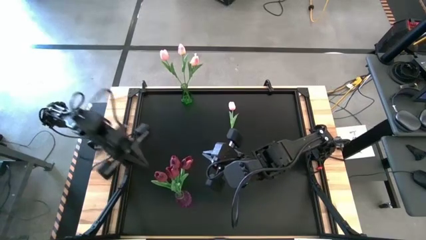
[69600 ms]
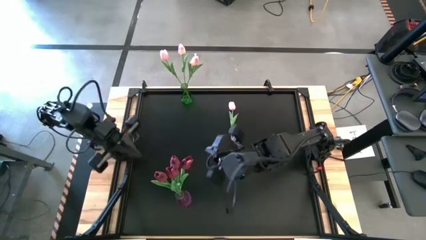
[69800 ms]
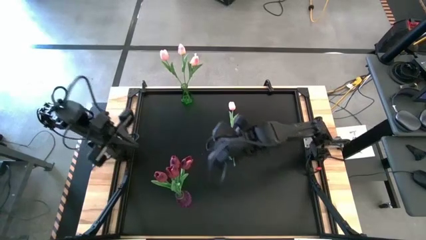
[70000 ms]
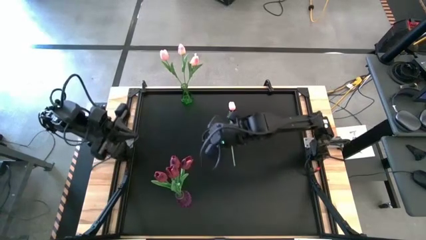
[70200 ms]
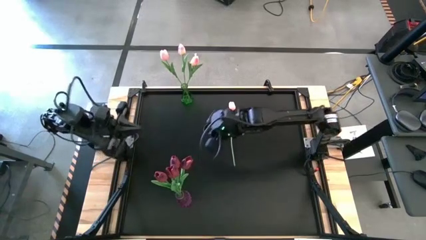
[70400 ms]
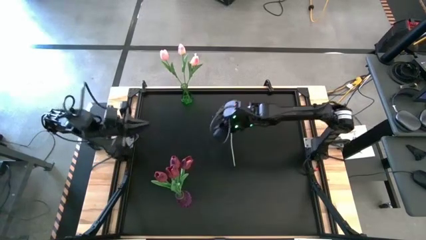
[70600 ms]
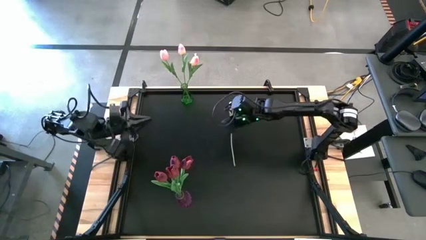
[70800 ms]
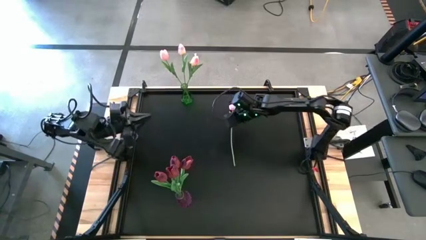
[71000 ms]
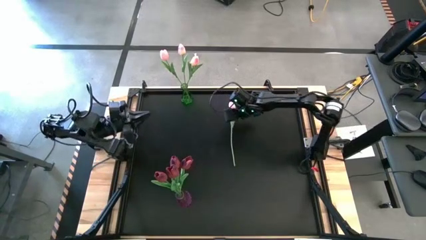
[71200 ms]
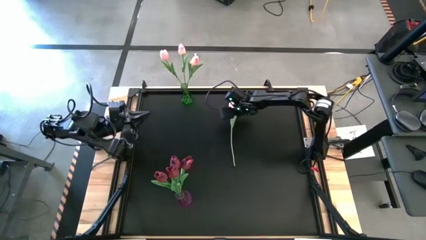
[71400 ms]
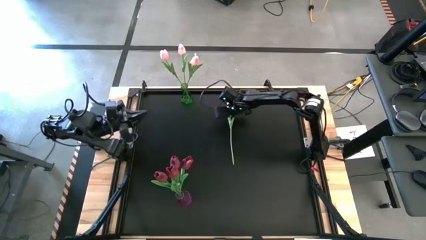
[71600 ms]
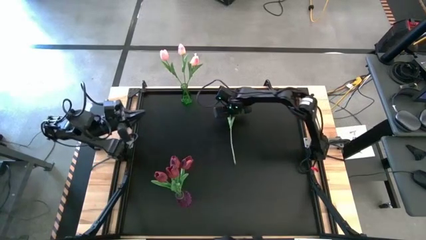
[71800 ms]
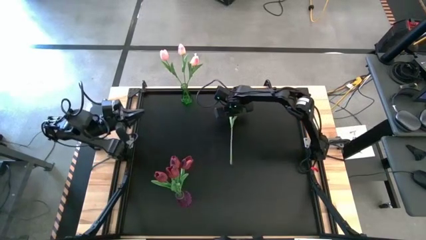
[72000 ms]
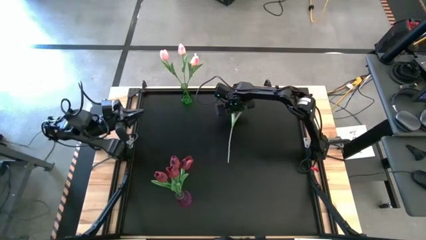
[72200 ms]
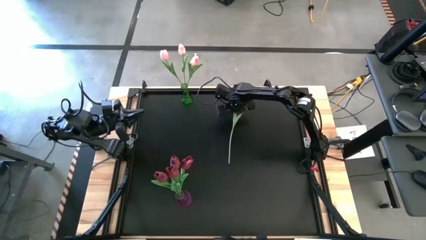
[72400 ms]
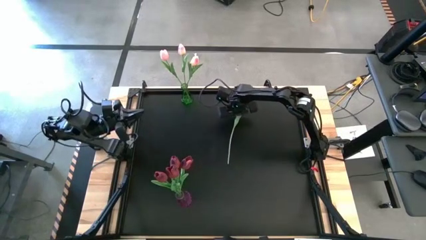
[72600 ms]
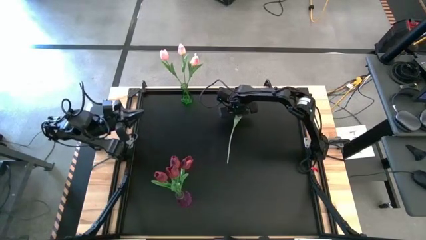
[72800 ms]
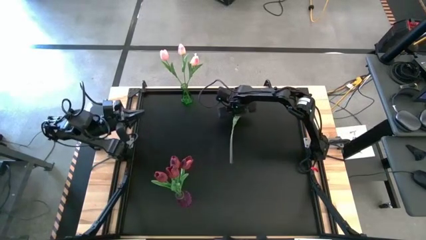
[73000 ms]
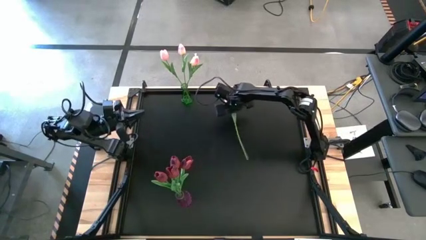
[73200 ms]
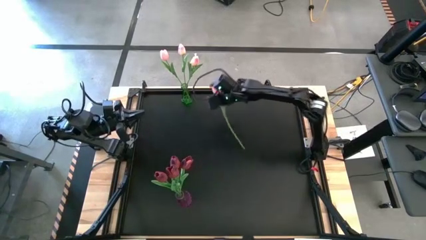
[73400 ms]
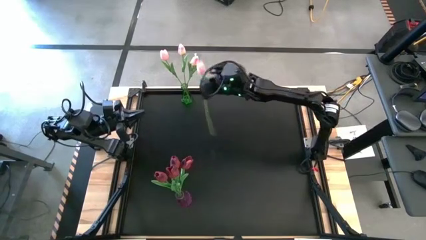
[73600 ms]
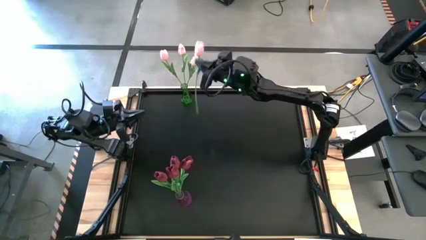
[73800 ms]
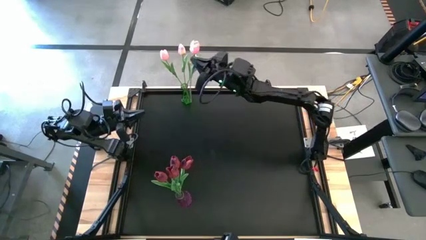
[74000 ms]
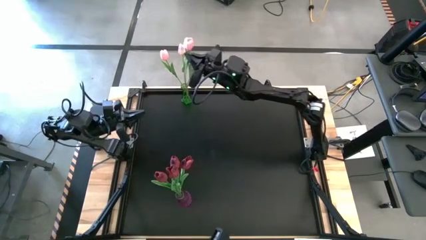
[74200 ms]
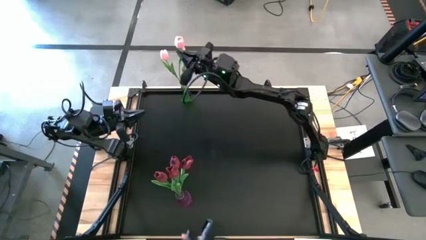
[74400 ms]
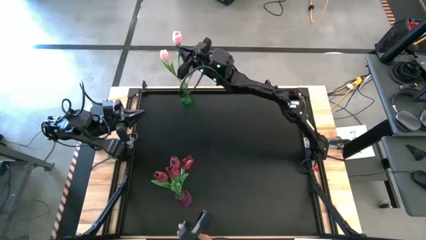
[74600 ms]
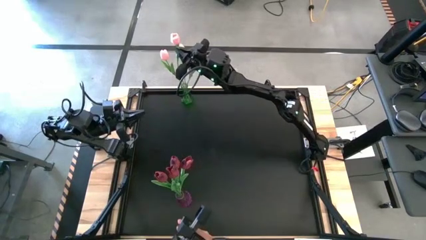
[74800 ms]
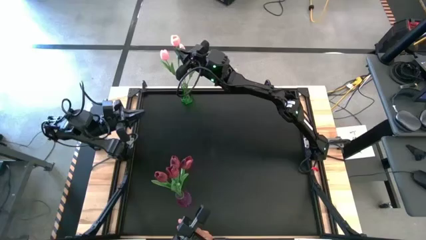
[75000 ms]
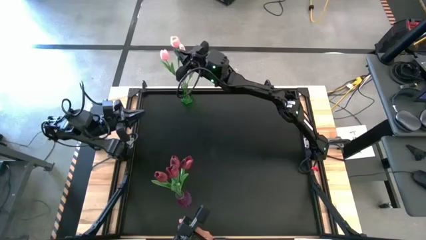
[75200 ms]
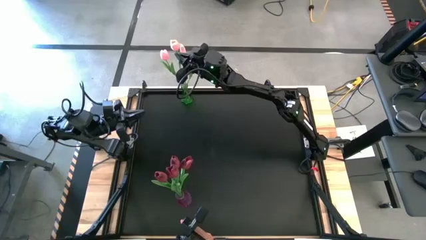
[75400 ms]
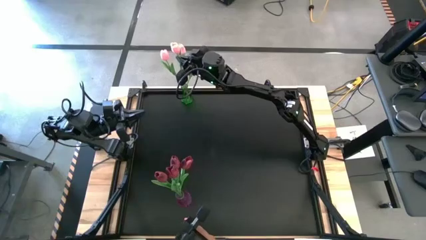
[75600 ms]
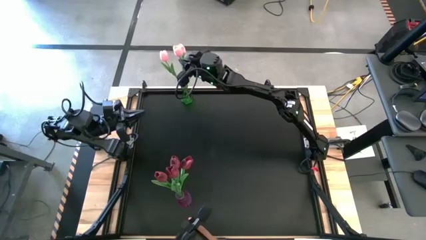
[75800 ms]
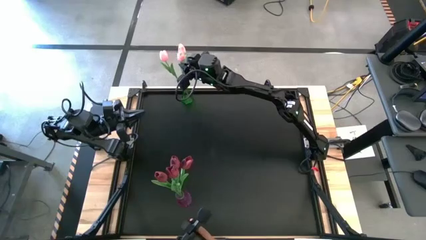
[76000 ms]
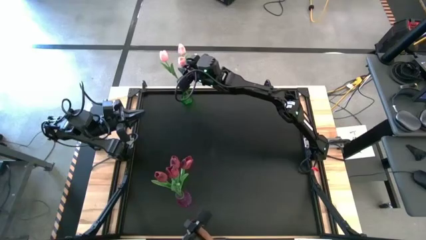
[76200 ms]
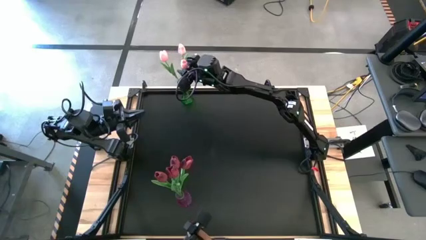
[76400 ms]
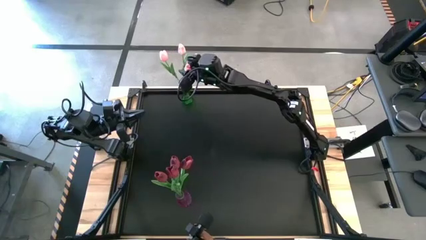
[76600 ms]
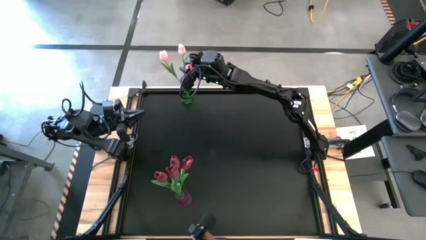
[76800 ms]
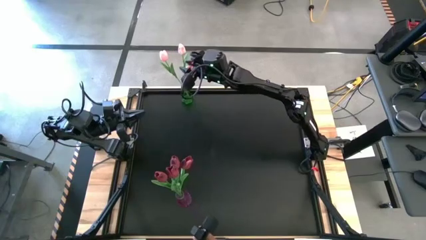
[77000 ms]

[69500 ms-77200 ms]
Task: Sort flowers into vase by color
Put the pink tulip into the green vase

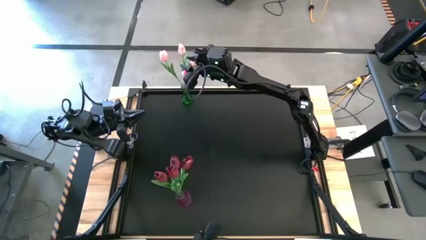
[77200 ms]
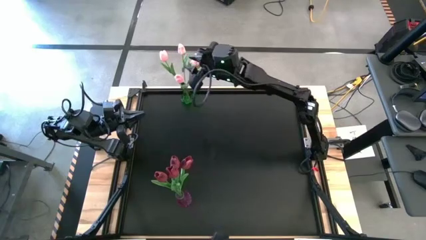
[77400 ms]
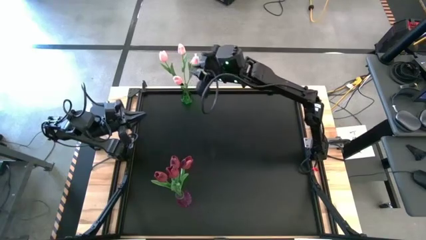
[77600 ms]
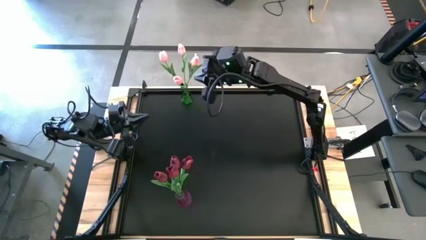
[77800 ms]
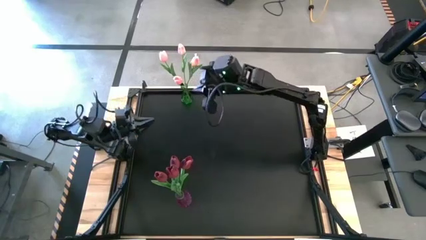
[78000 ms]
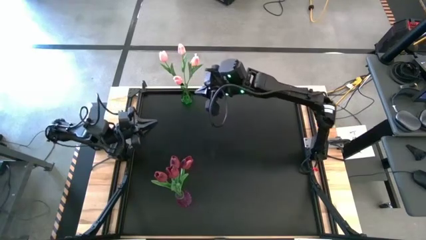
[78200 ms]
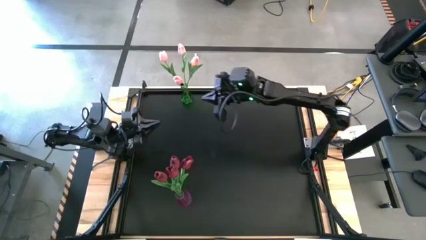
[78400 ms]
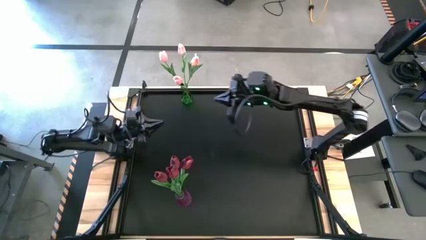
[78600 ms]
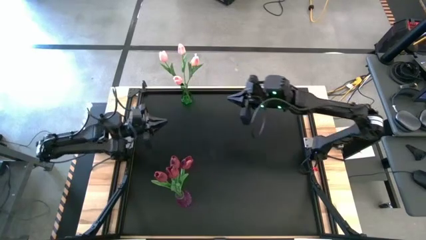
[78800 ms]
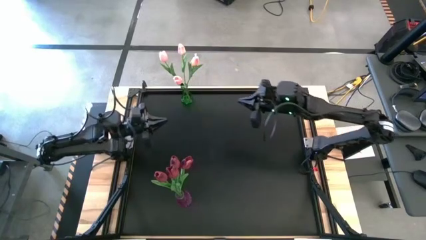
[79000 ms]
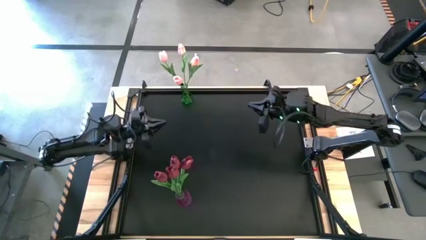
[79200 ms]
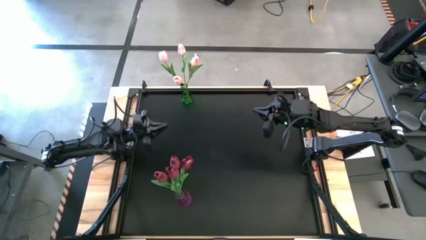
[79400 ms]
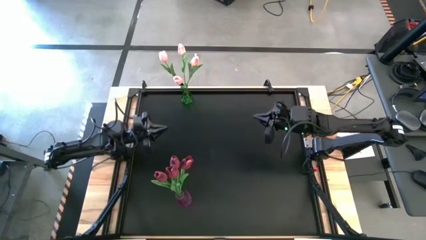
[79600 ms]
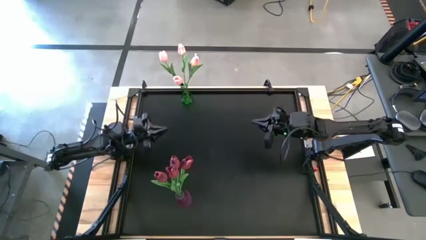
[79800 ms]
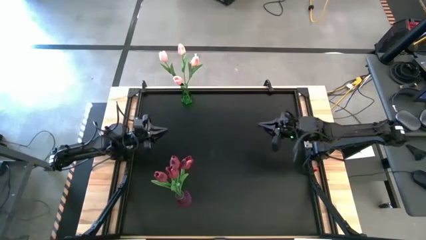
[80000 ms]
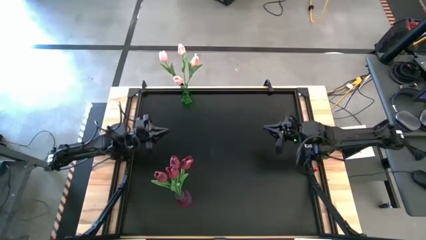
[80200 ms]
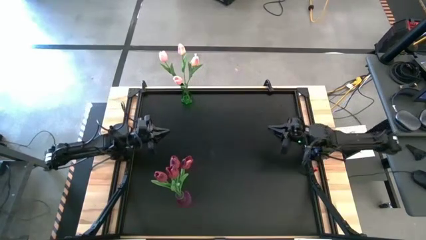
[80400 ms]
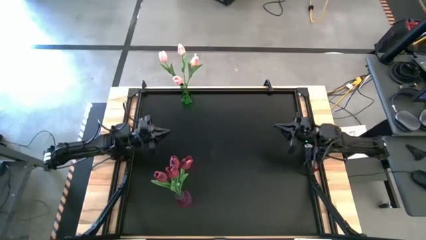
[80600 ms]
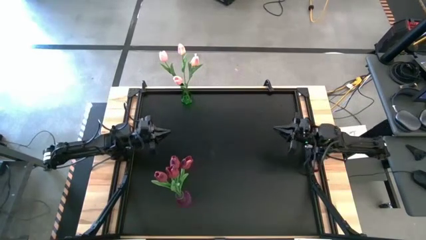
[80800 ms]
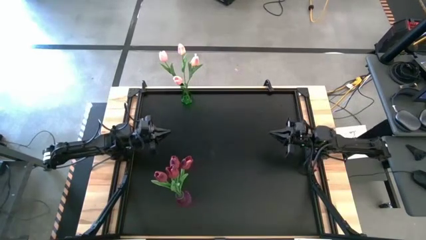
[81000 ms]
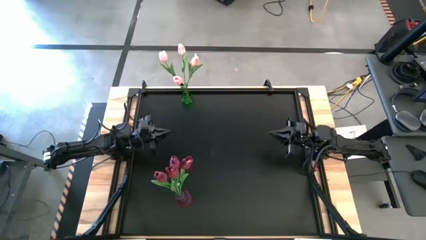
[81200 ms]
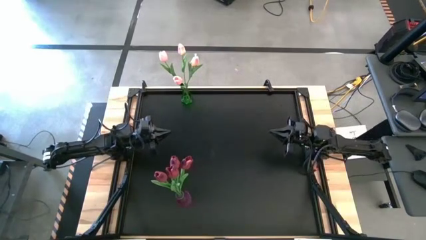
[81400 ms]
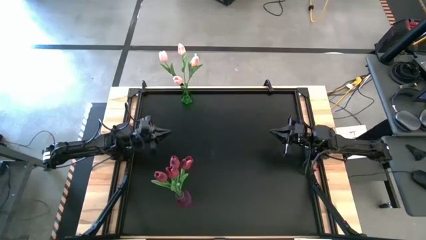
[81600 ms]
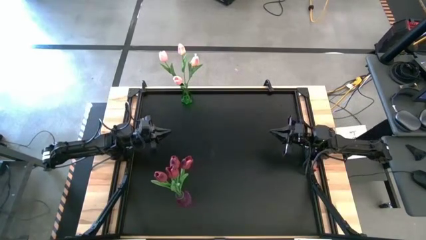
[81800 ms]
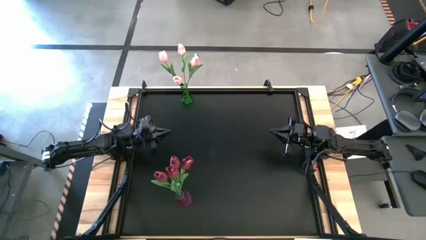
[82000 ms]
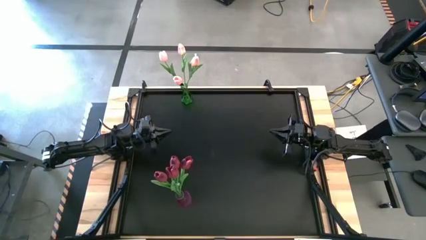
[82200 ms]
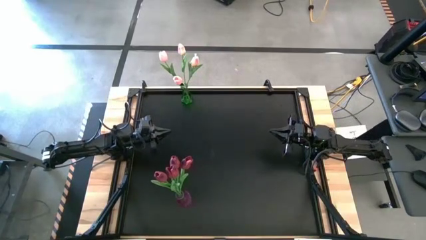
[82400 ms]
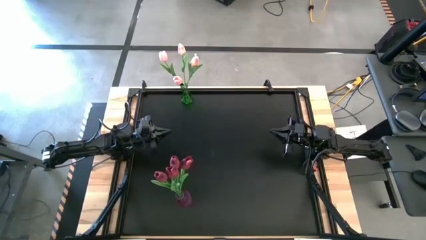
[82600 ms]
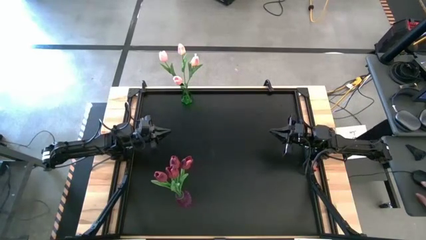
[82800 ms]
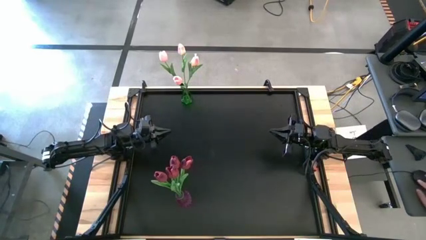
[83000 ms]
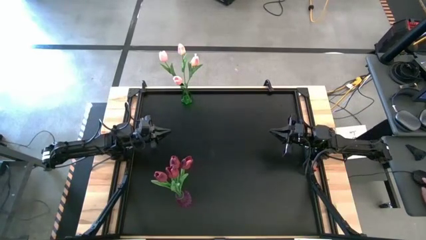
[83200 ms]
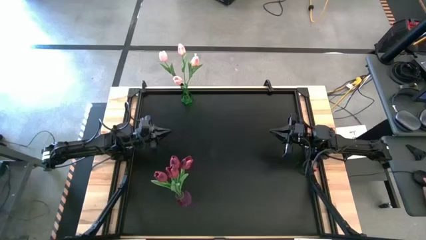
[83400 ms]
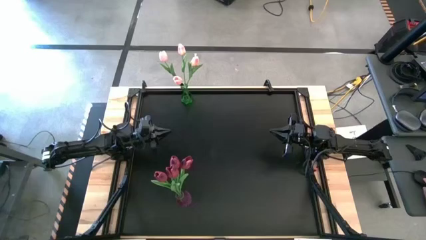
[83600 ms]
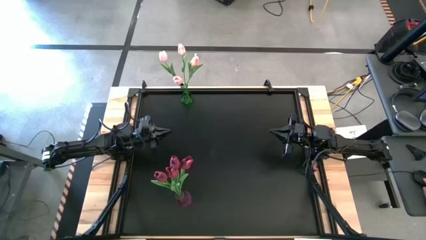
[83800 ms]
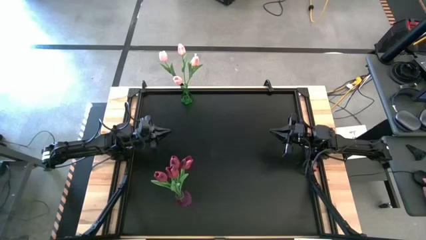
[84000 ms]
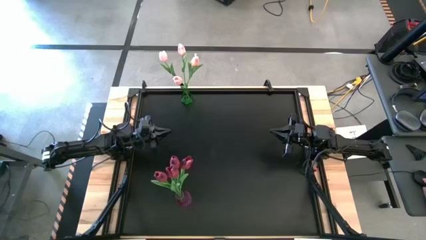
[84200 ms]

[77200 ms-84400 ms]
Return to Home Position

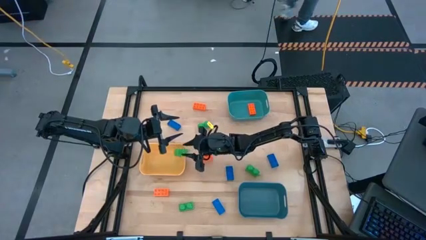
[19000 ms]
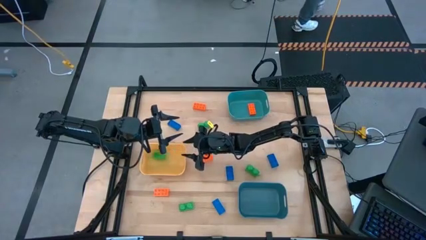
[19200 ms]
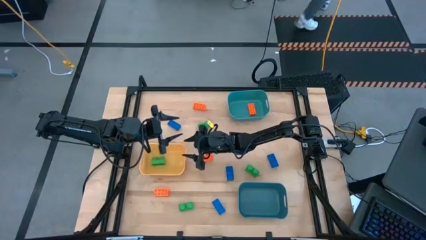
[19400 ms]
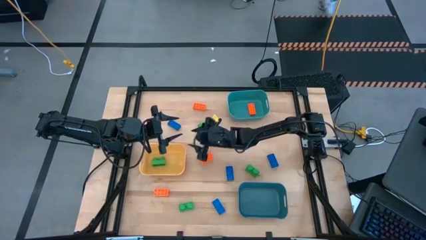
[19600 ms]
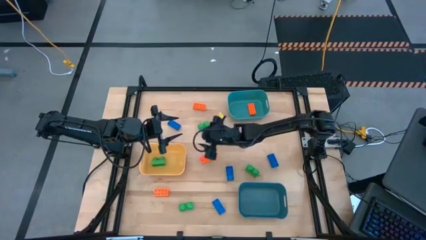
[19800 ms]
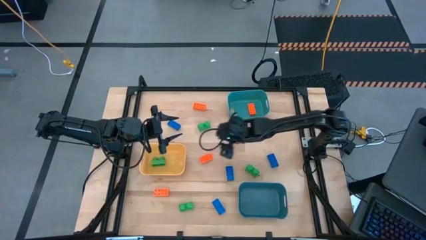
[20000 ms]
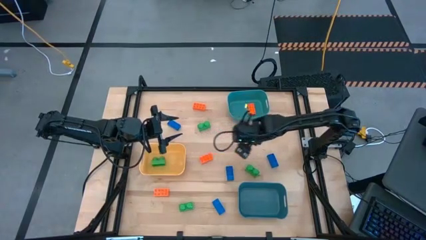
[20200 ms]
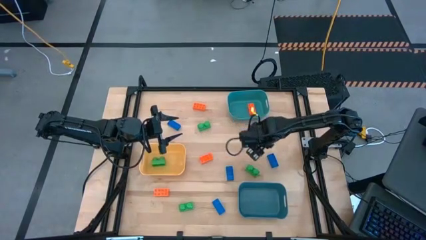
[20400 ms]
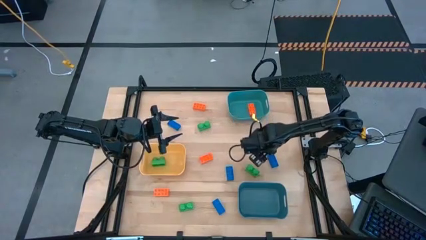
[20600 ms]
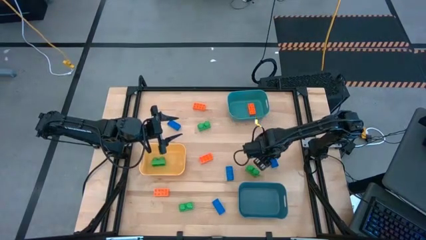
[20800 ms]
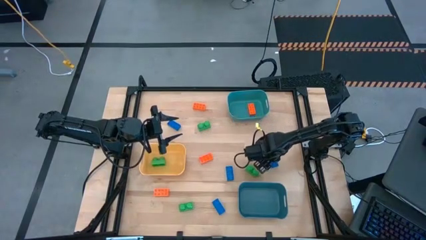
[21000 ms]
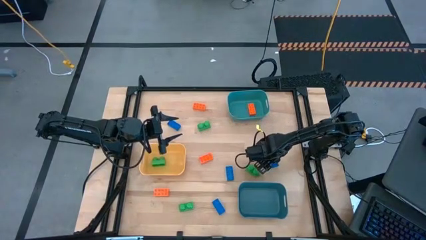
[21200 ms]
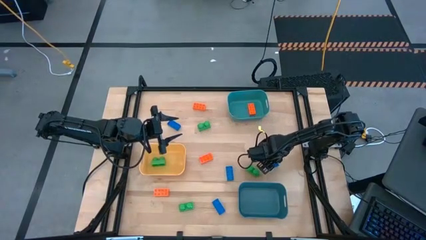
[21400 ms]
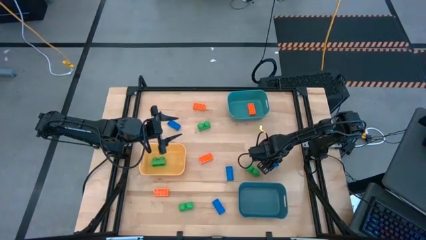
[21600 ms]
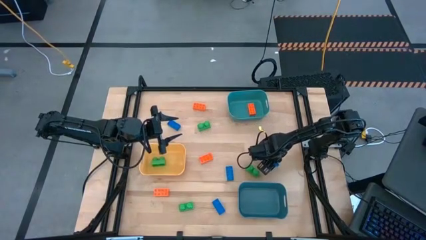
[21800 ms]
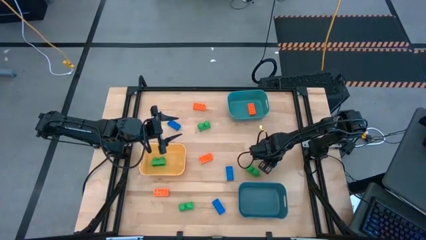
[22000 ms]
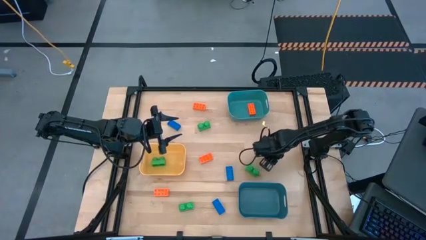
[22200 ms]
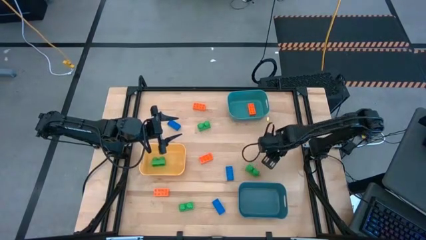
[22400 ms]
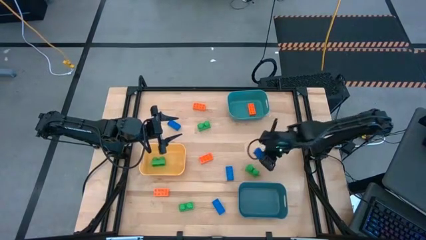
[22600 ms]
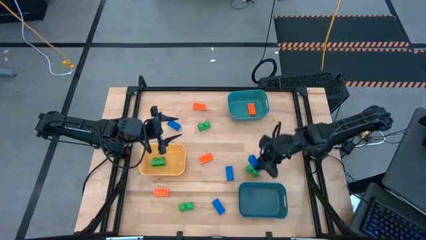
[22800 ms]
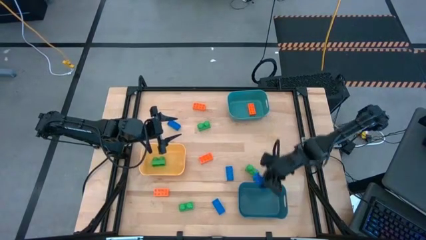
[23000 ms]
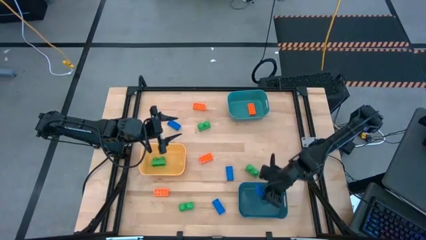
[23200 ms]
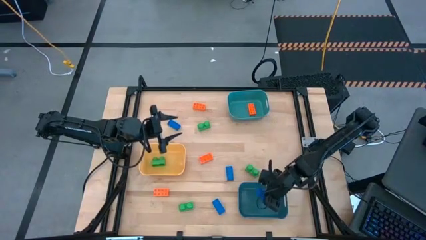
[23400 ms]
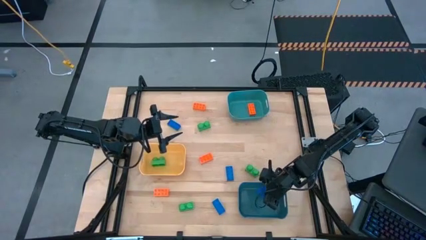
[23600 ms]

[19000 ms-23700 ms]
Task: Sort & place blocks by color
Put the blue game piece into the blue bin
